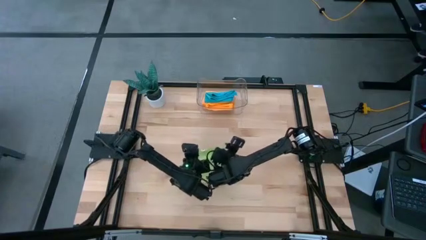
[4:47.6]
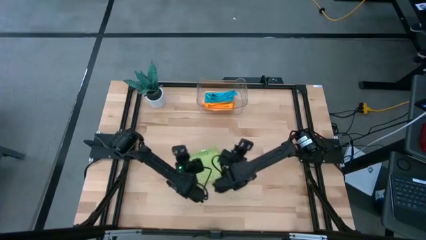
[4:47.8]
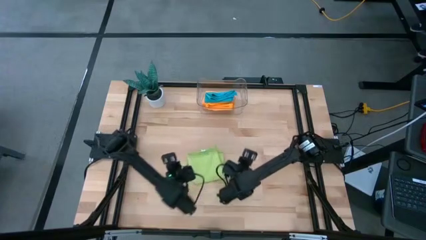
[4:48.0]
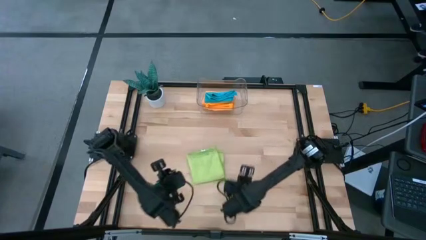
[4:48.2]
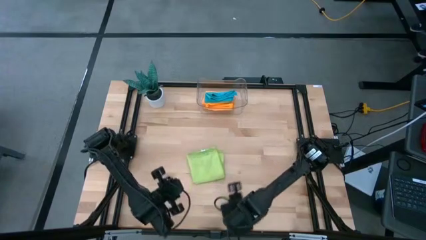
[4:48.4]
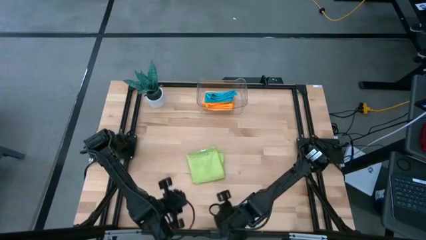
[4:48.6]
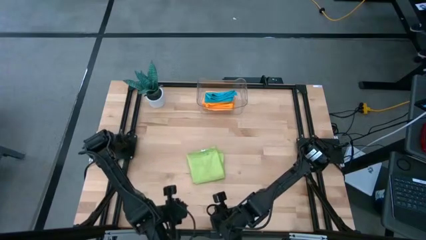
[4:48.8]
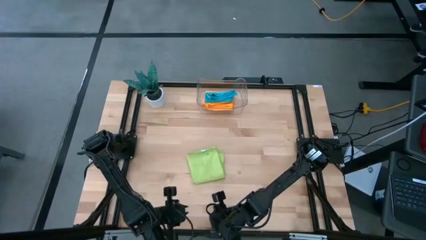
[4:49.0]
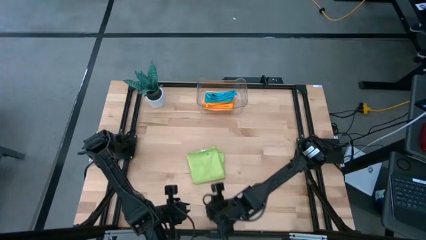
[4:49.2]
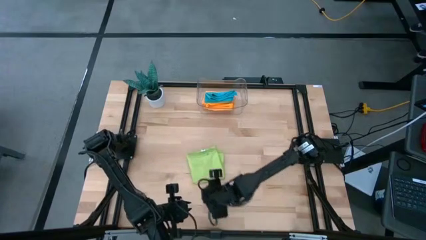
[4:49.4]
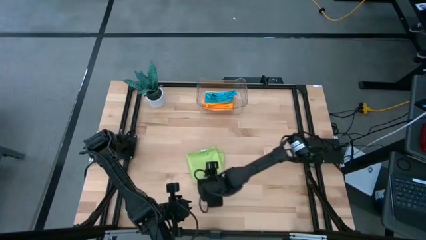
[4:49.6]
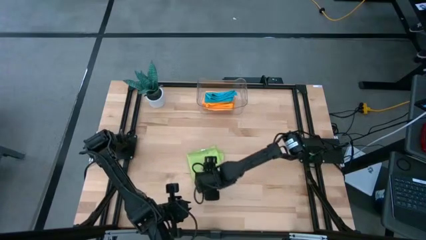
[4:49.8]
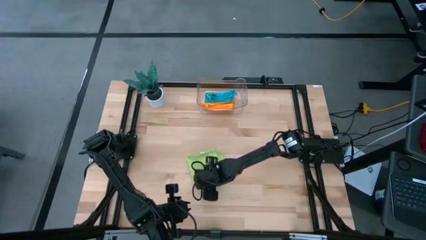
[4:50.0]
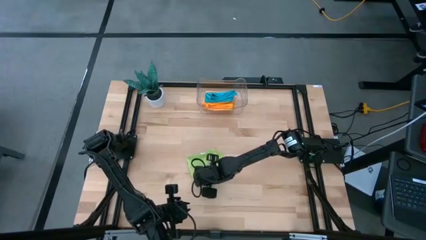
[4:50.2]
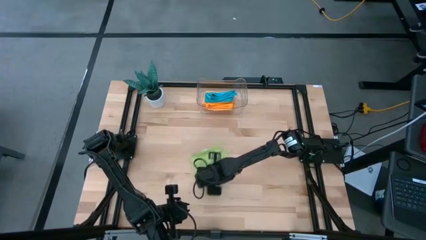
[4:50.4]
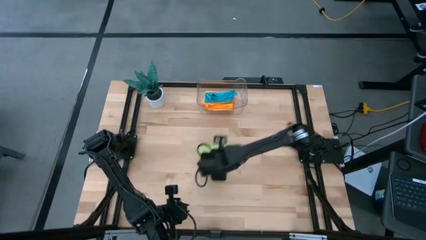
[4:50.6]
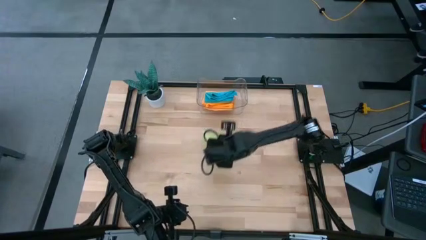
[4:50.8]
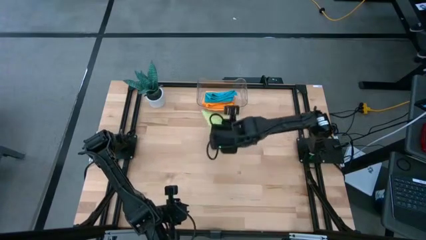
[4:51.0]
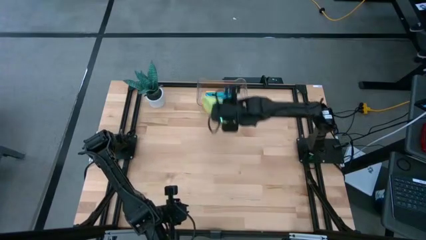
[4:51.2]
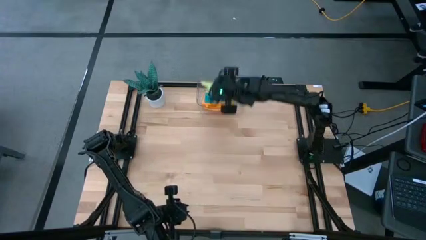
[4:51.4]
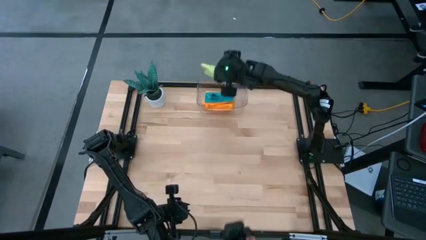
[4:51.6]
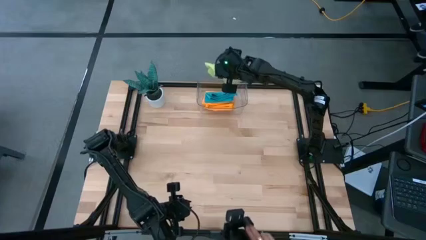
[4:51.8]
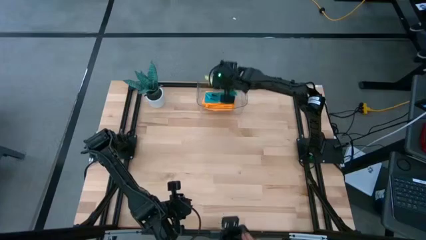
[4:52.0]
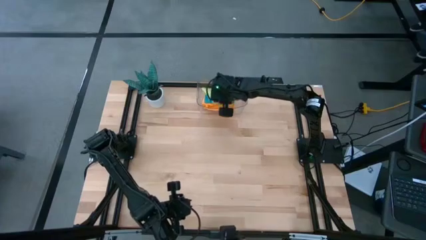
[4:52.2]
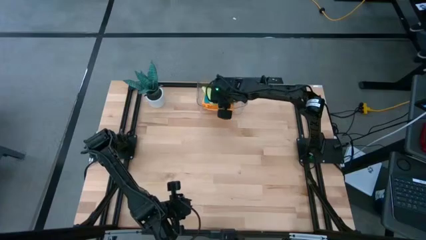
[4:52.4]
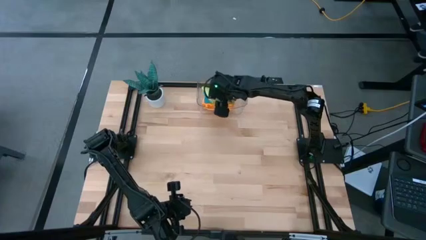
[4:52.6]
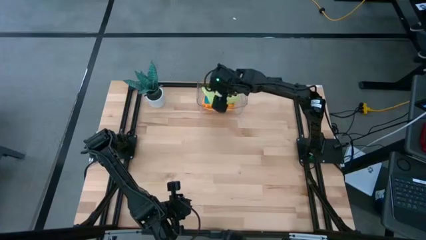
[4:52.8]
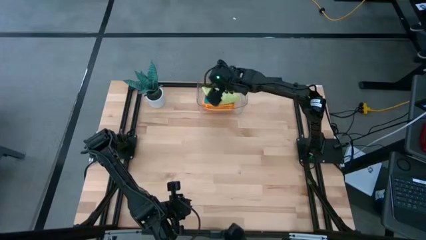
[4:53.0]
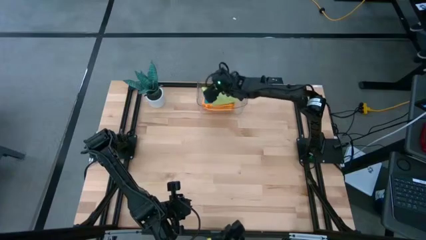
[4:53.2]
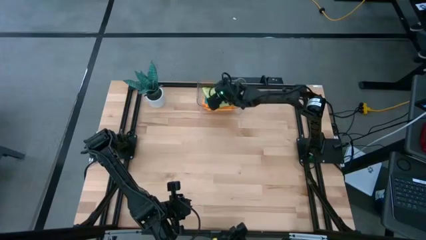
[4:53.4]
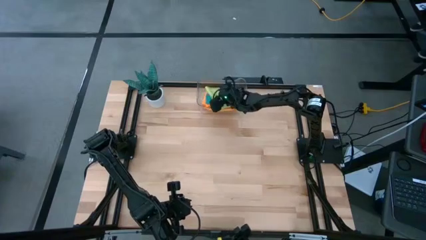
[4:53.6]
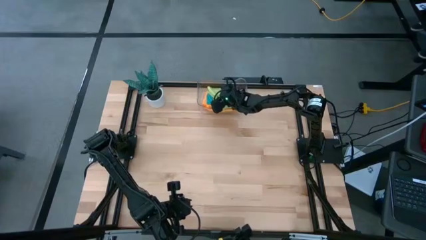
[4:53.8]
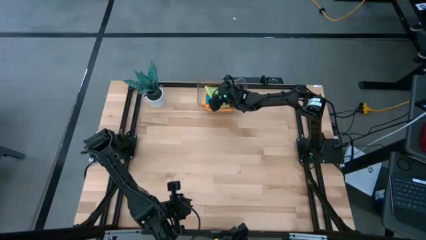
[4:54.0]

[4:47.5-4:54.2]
Task: Fold microfiber towels
Put the green microfiber cloth into the transparent bin

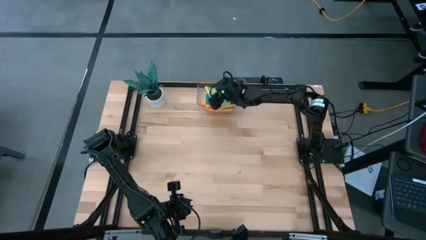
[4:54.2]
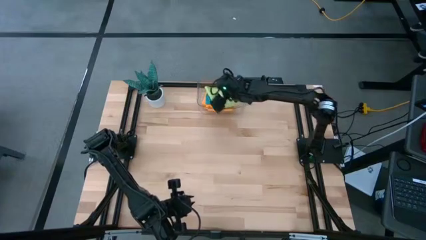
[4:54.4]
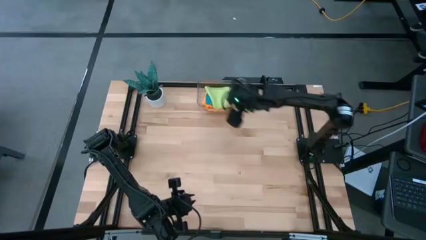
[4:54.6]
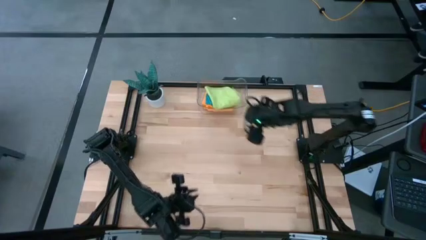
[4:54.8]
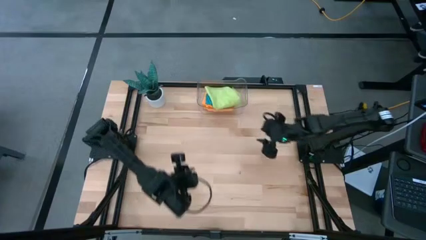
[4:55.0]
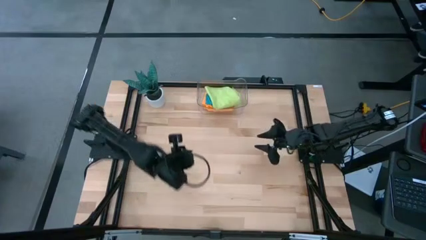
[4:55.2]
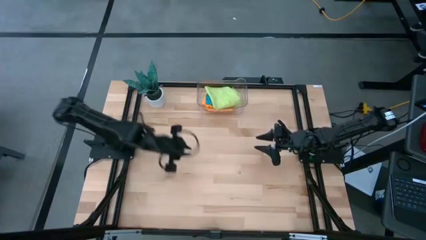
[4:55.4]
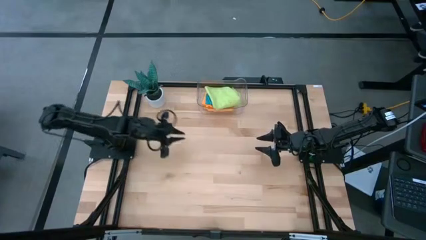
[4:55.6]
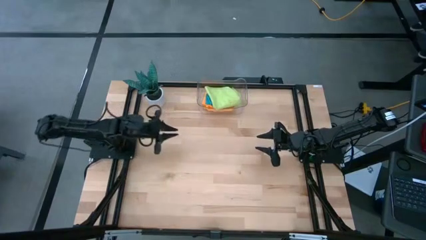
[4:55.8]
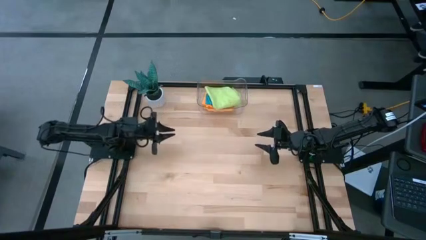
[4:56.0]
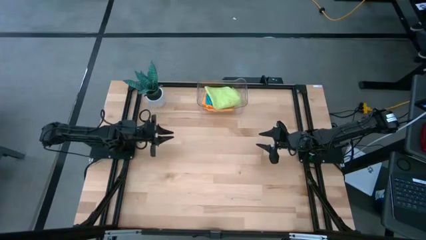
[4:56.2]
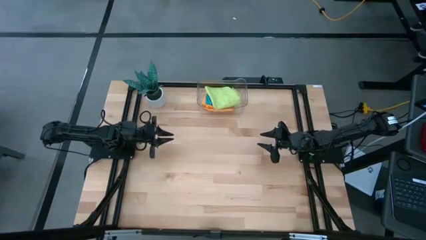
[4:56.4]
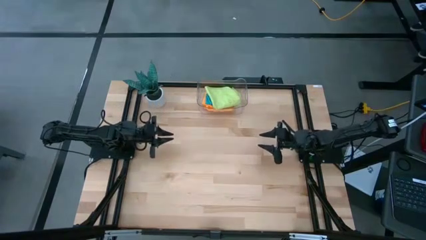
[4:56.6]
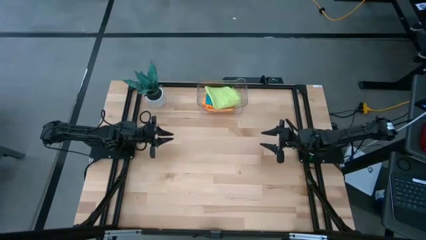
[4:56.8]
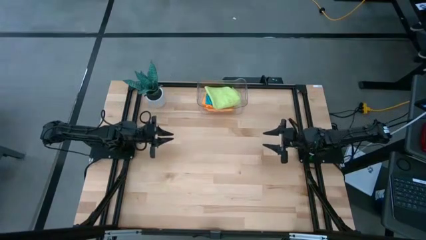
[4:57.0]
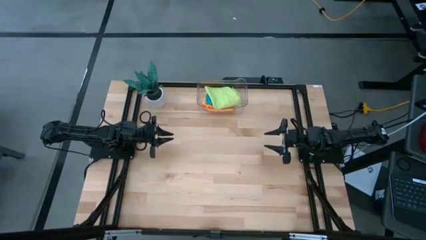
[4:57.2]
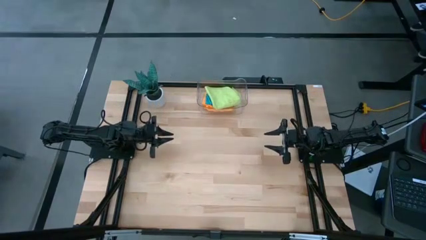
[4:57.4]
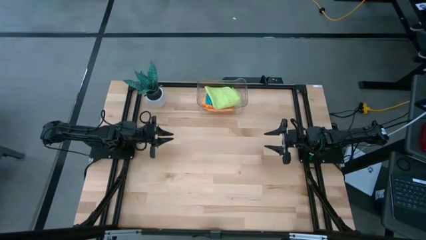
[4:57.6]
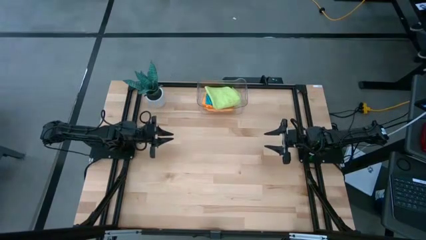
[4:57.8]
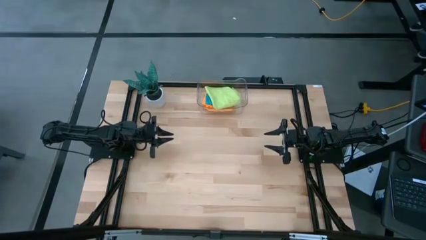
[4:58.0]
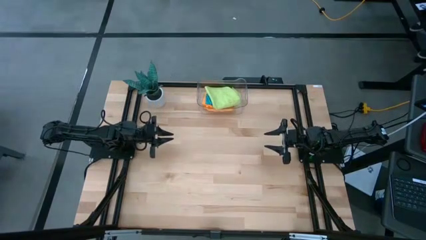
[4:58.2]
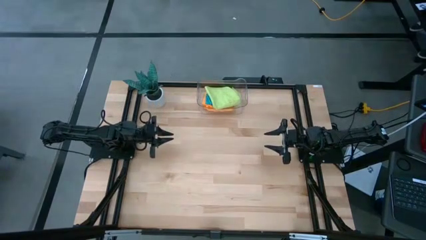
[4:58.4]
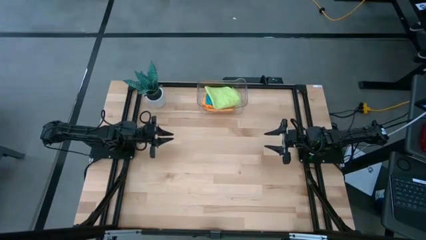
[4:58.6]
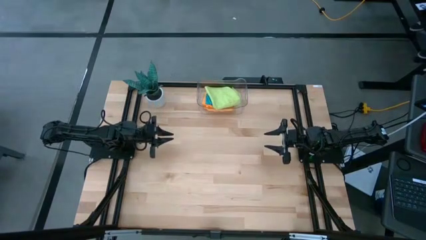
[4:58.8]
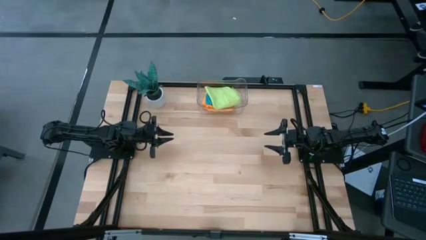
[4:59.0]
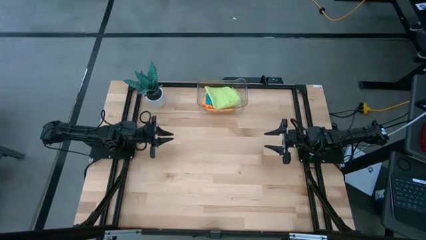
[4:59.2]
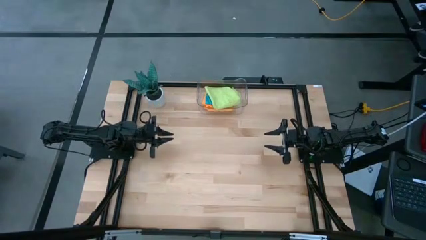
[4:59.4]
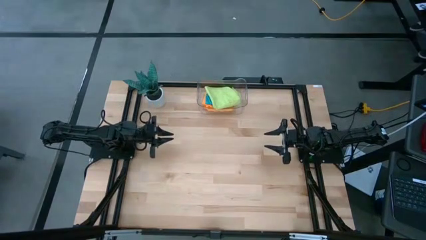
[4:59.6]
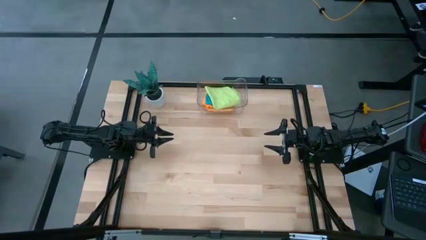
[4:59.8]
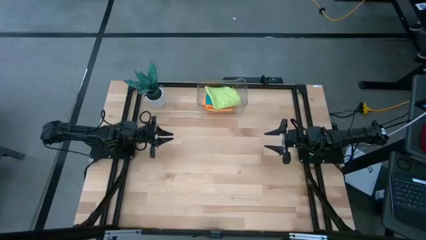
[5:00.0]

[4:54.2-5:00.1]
Return to Home Position

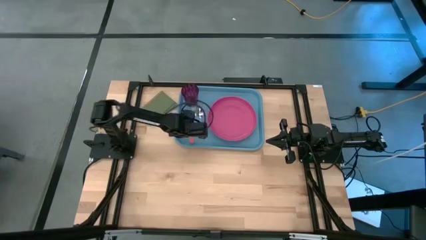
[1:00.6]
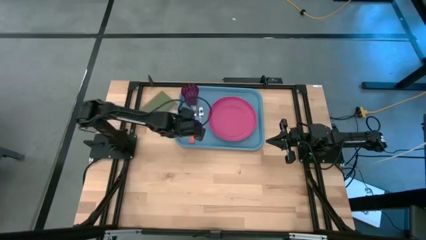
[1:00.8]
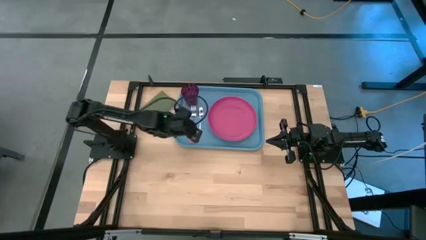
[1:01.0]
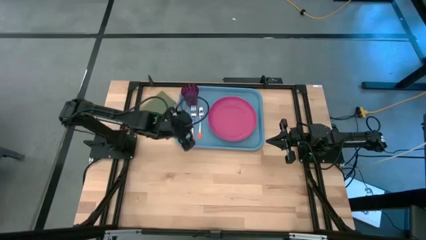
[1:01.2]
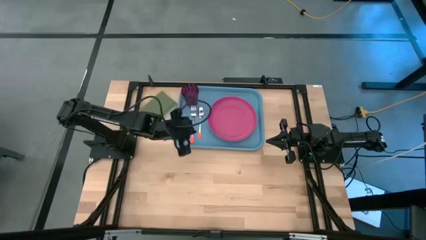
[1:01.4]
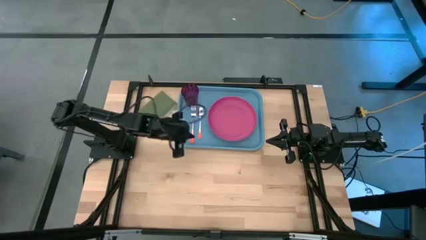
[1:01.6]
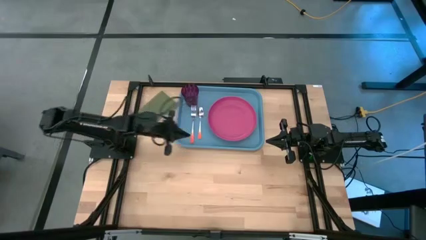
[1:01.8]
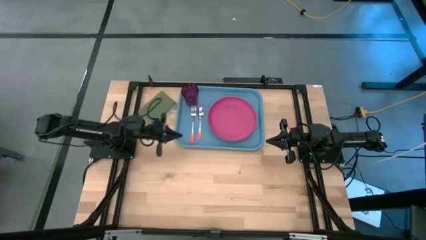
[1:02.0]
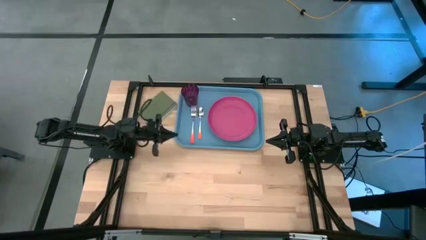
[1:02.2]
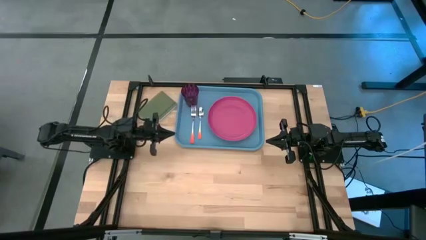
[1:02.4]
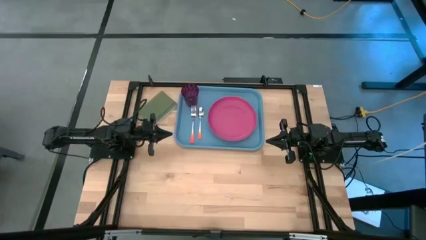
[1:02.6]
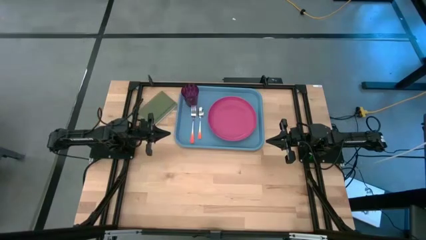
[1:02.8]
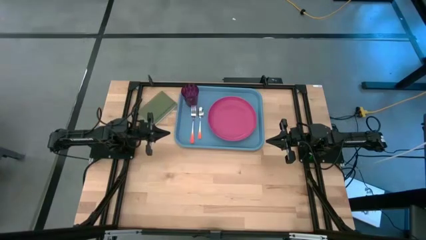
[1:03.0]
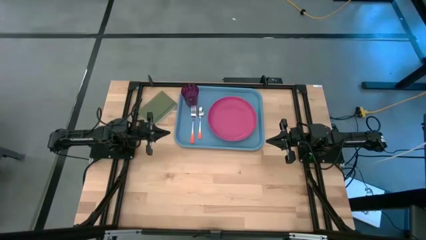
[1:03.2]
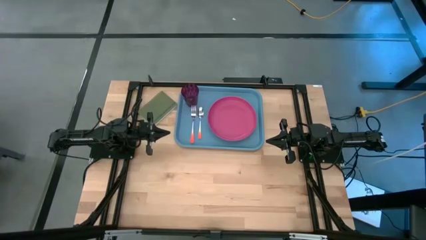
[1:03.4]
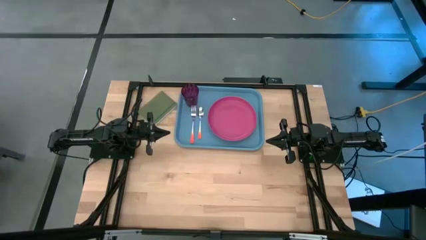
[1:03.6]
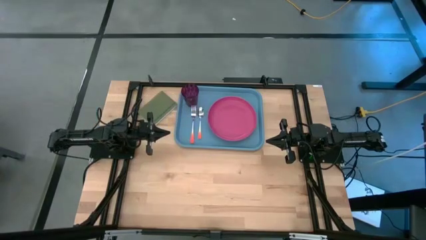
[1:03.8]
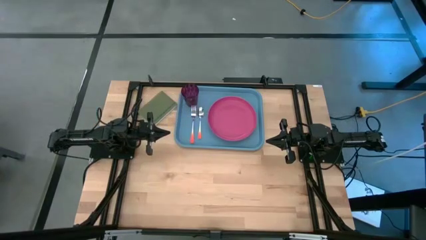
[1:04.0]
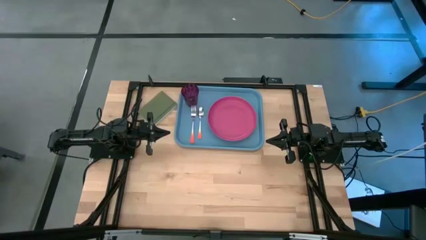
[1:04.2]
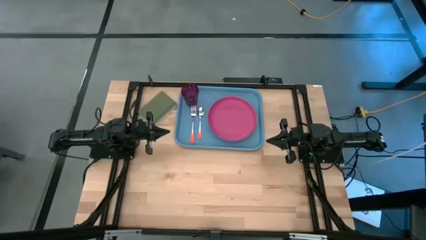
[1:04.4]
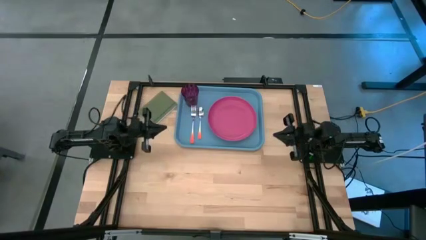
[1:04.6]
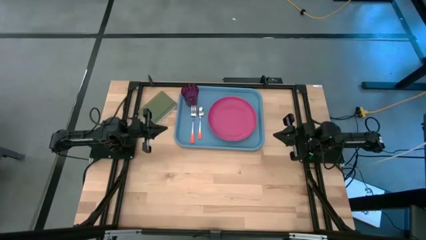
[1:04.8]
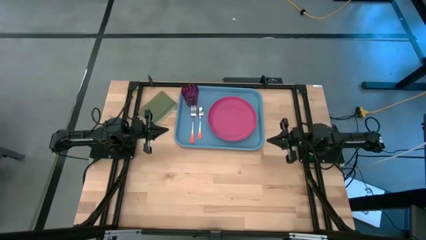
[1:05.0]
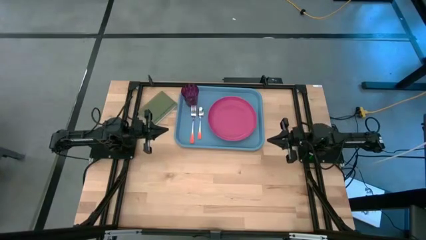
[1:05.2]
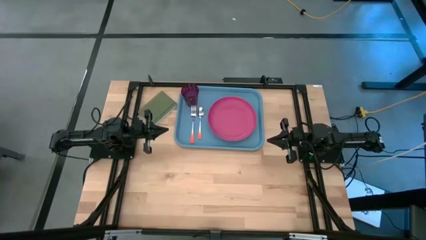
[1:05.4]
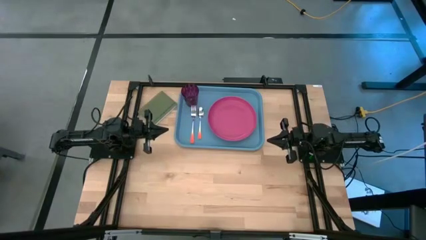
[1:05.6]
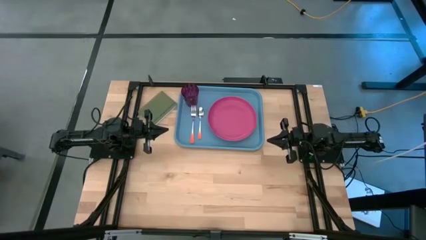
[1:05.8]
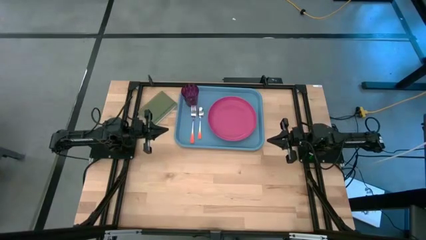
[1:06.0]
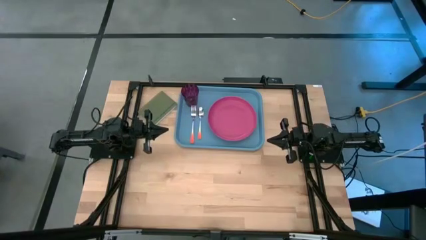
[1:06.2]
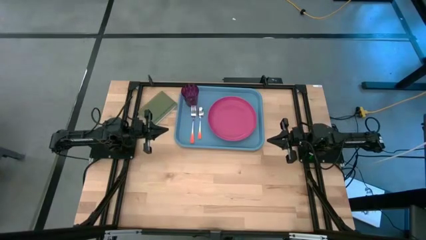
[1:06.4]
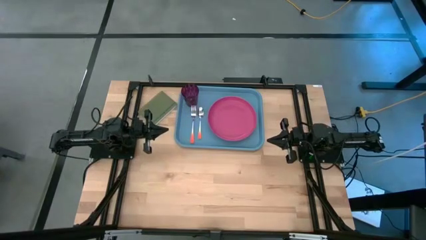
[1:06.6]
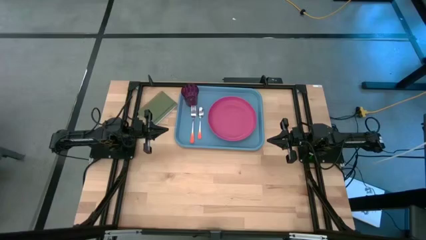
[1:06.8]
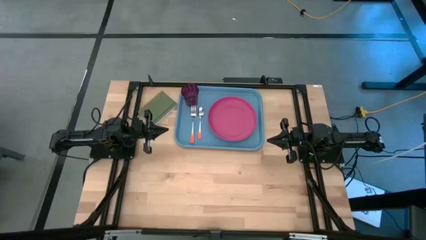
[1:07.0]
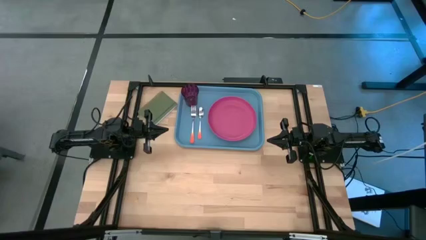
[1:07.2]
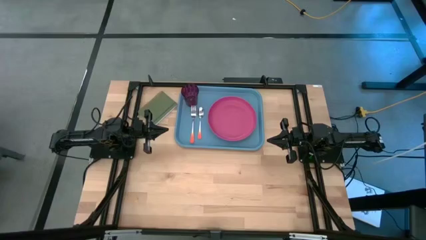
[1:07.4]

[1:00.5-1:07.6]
Task: Pick and place plate/cup/fork/spoon on tray
Return to Home Position
